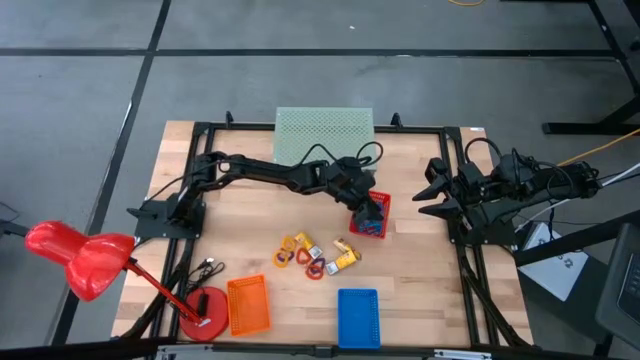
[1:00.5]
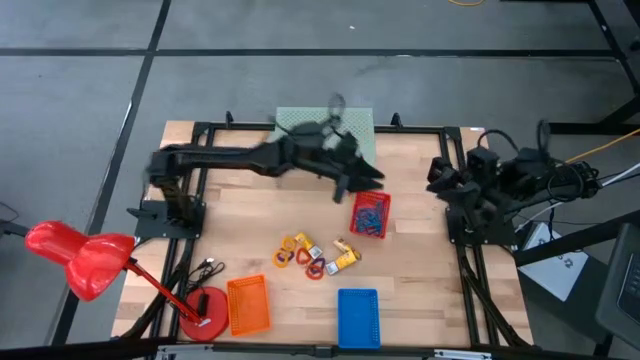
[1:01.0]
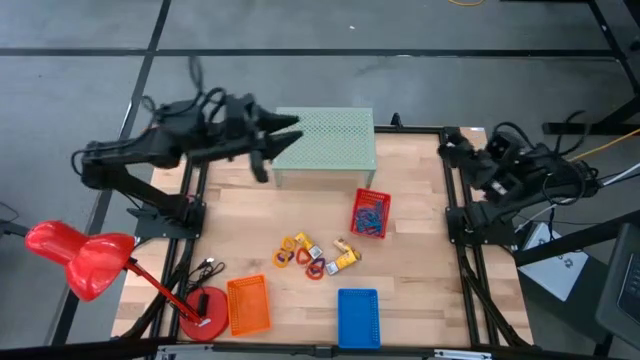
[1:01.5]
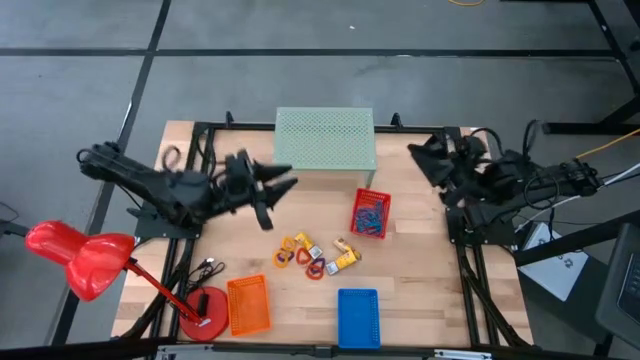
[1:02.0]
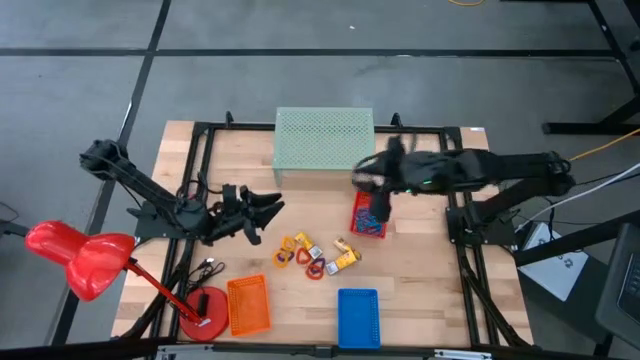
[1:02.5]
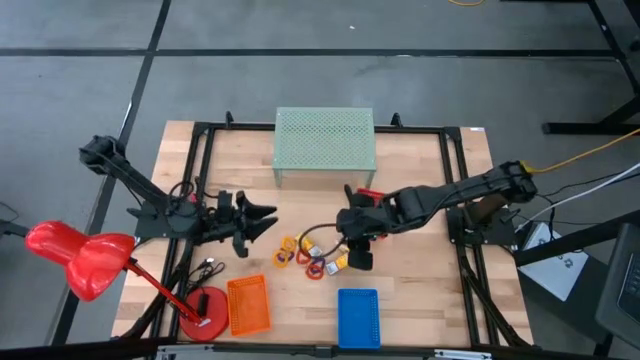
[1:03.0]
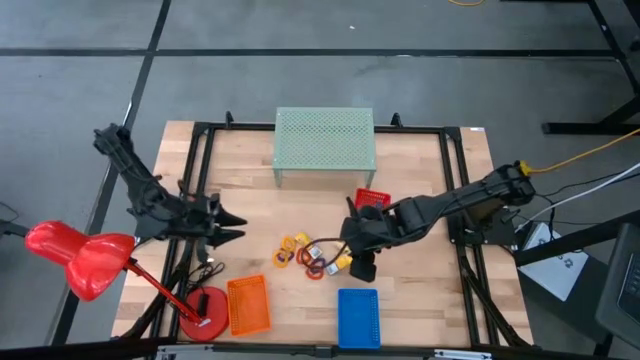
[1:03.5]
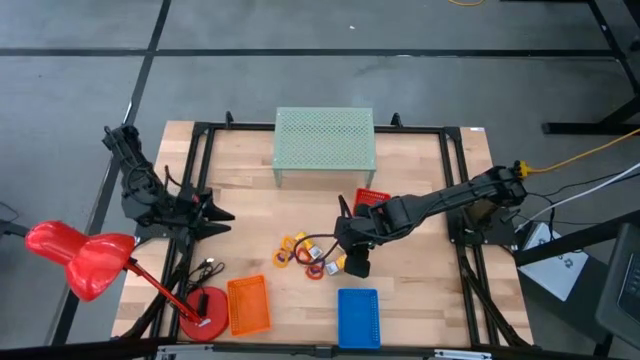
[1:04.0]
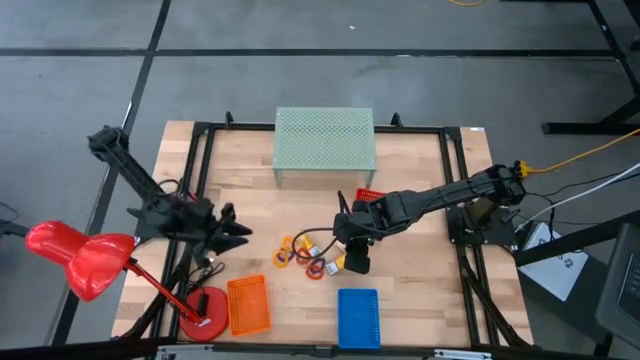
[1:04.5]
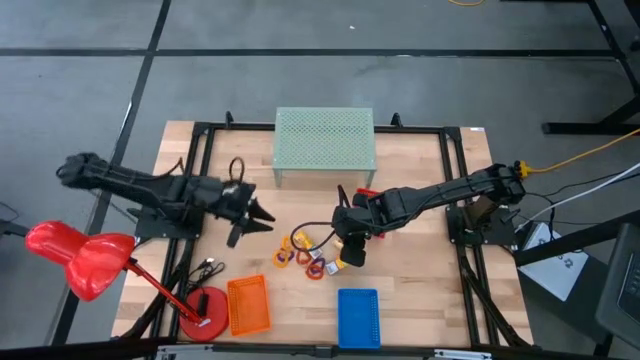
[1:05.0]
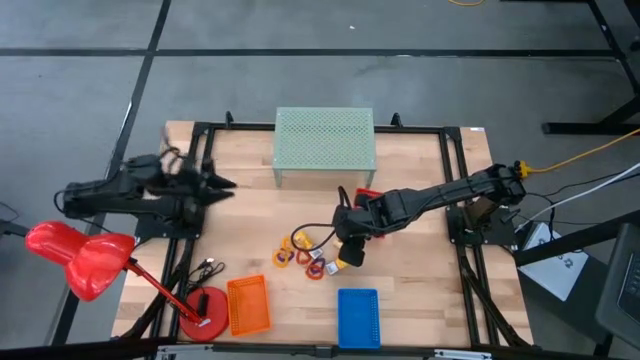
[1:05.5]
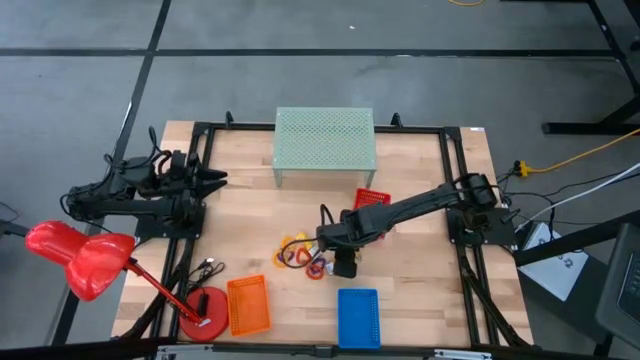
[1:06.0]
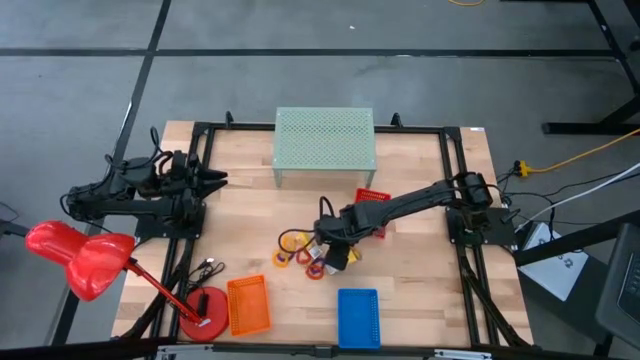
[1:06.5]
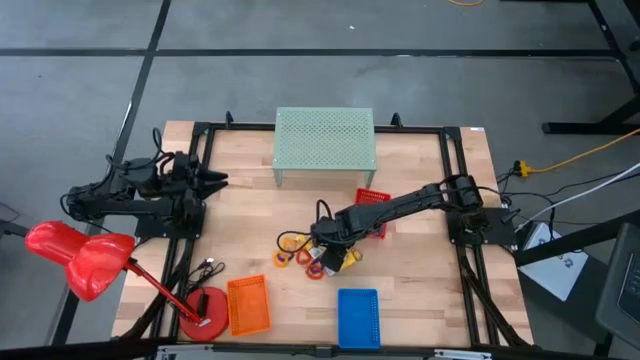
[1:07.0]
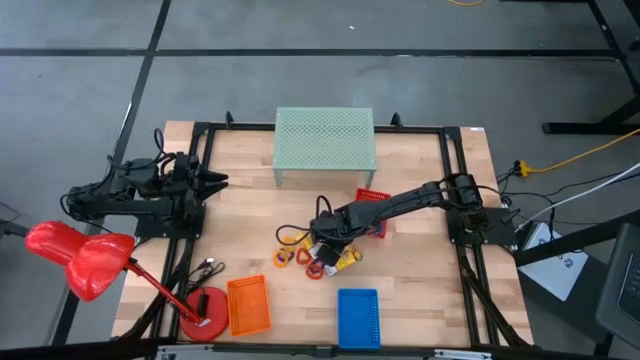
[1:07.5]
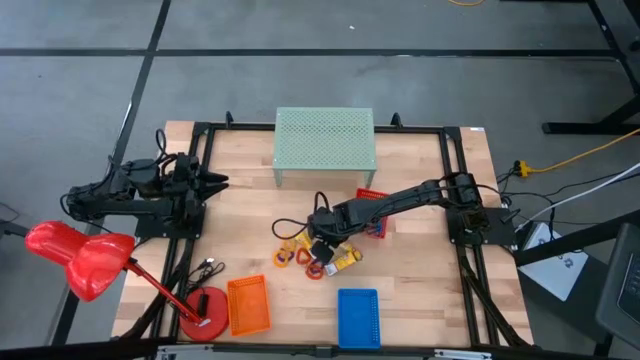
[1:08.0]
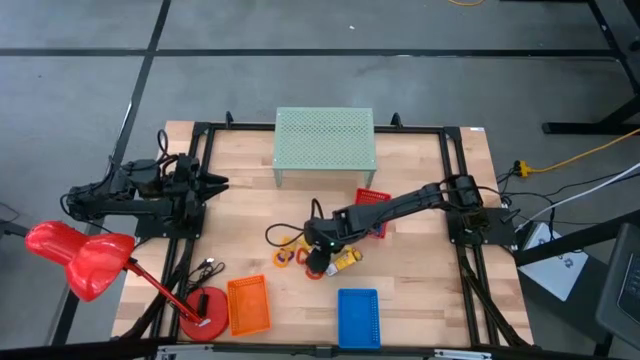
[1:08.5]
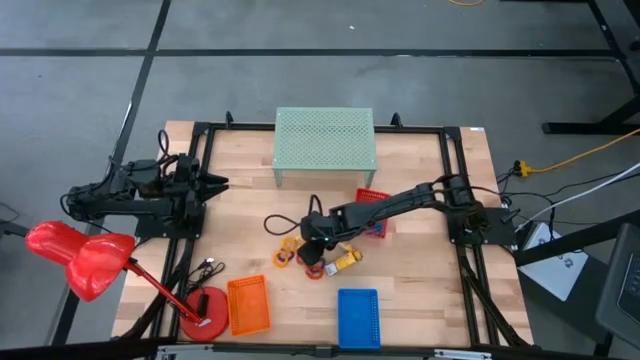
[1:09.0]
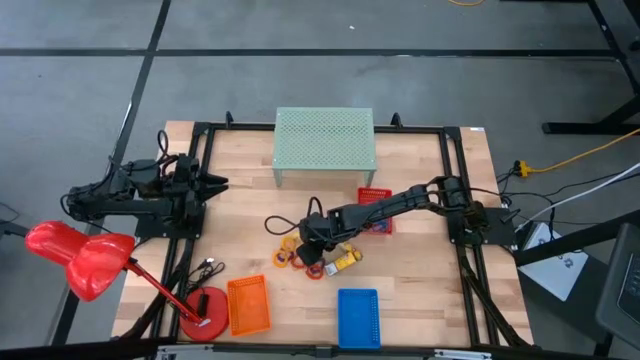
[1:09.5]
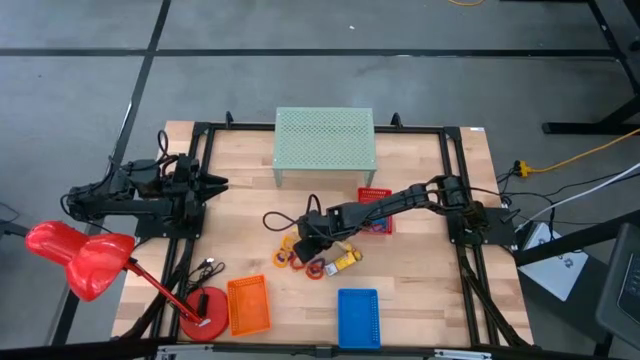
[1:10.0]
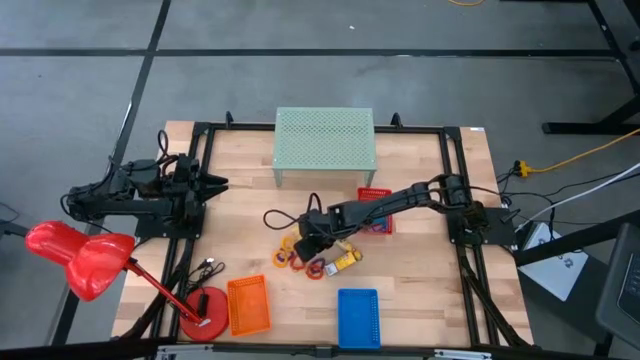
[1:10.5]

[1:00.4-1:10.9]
Task: Pick & Place Office Desk Supplies
Put the crayon box into the blue basket

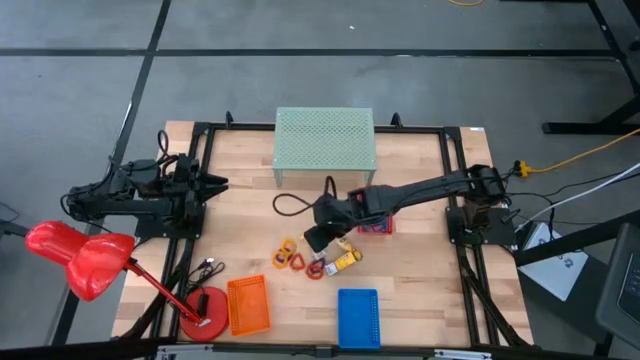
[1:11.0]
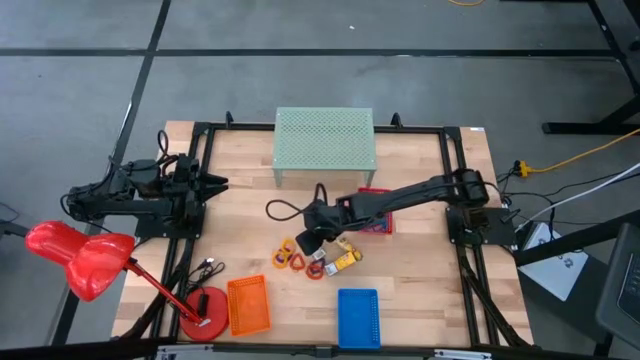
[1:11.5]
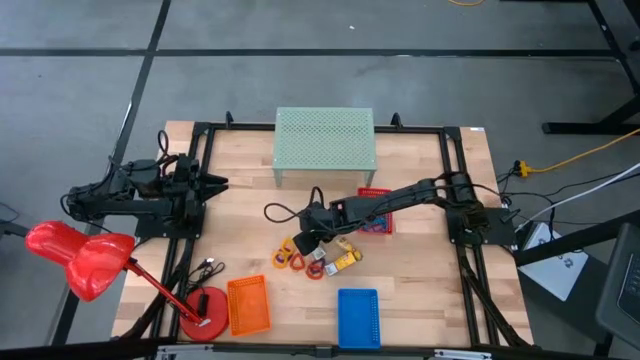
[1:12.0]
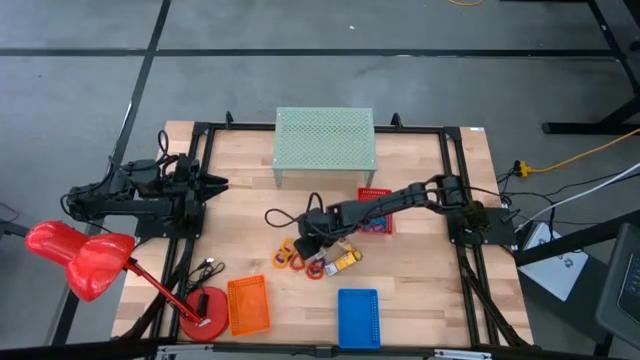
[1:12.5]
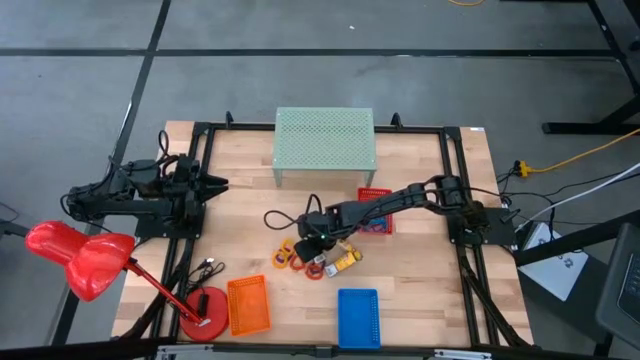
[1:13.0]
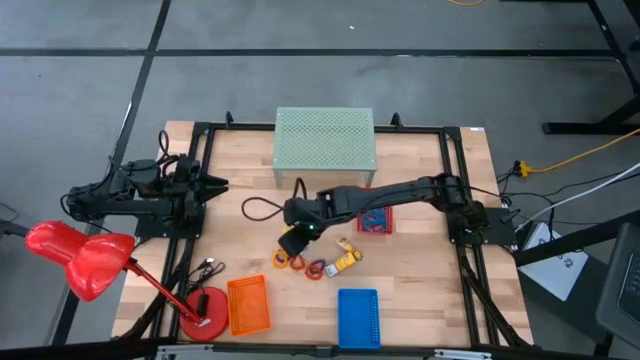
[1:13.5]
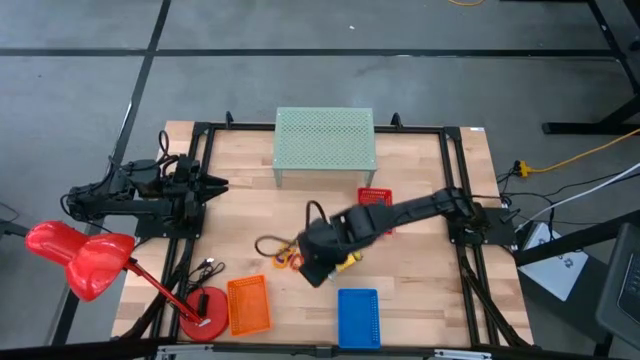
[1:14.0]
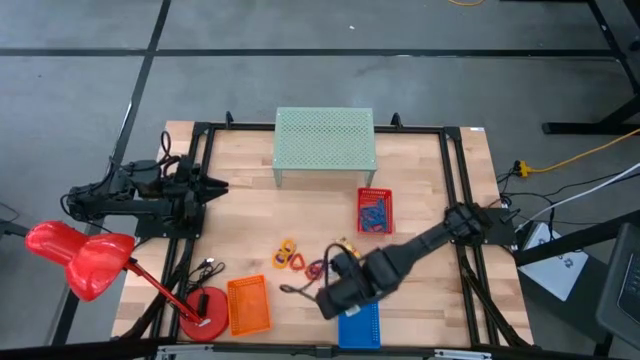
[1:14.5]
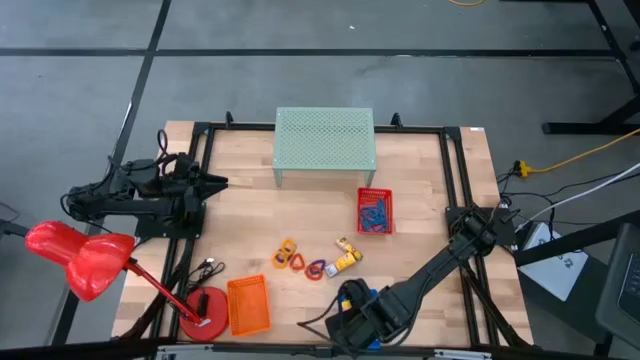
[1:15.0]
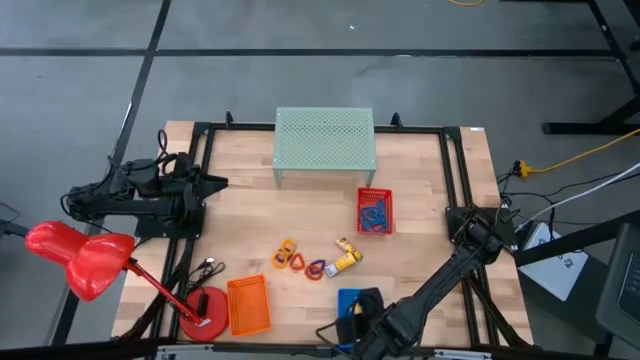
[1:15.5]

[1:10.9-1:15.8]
Put the crayon box into the blue basket

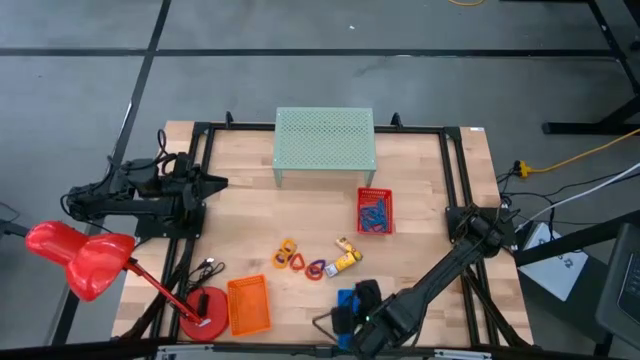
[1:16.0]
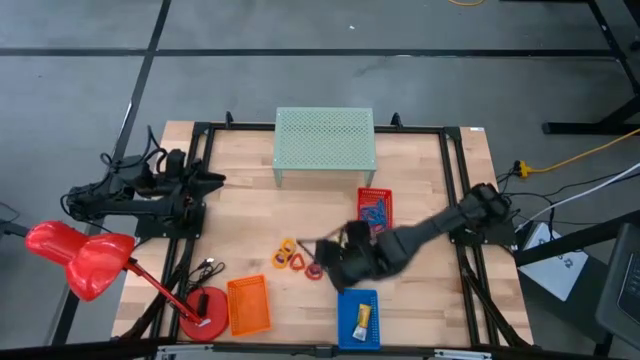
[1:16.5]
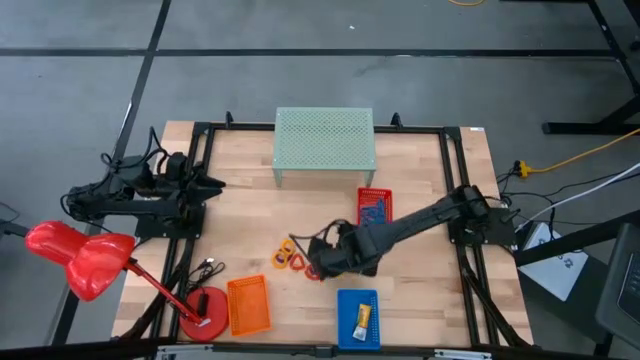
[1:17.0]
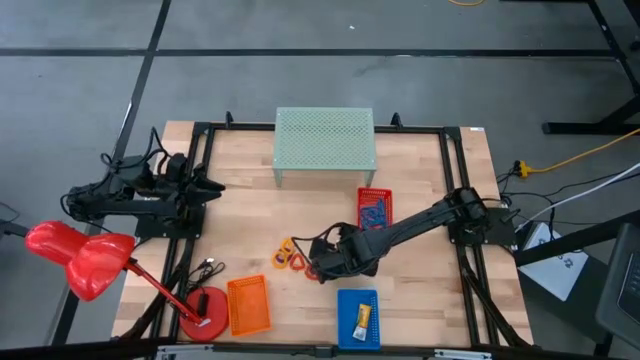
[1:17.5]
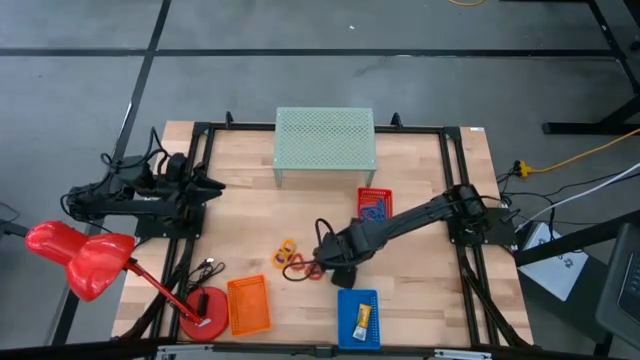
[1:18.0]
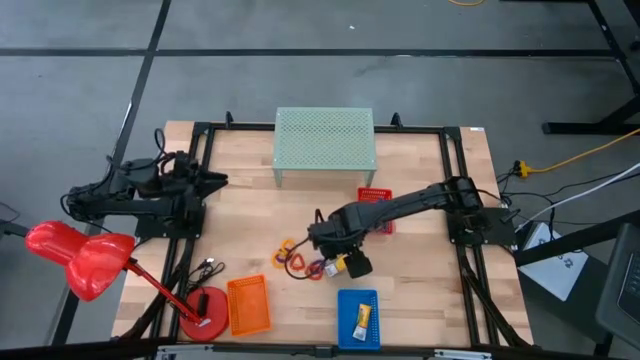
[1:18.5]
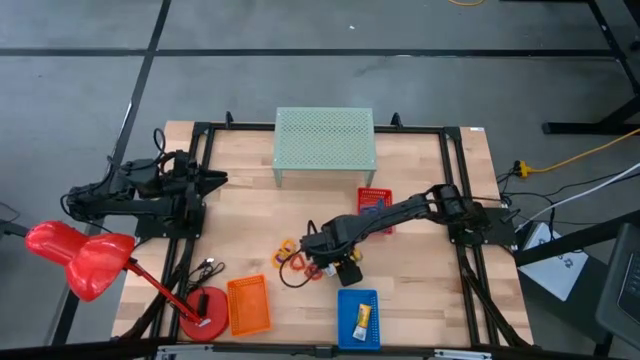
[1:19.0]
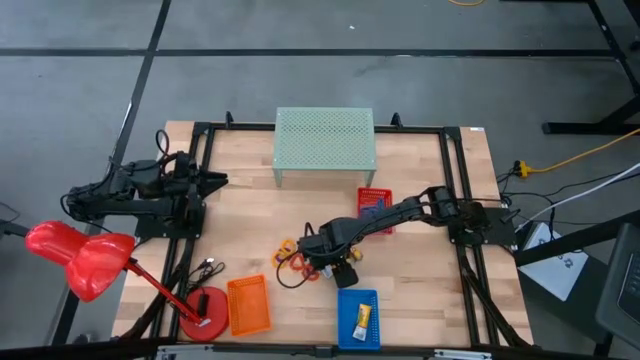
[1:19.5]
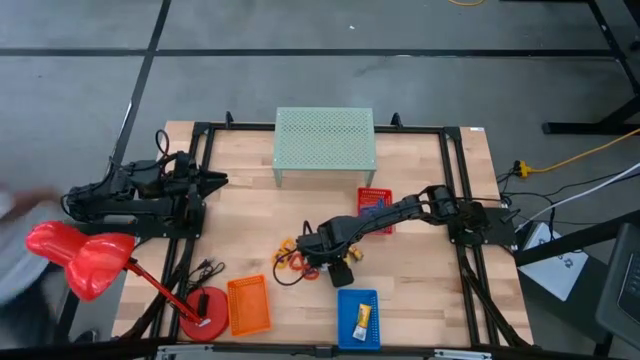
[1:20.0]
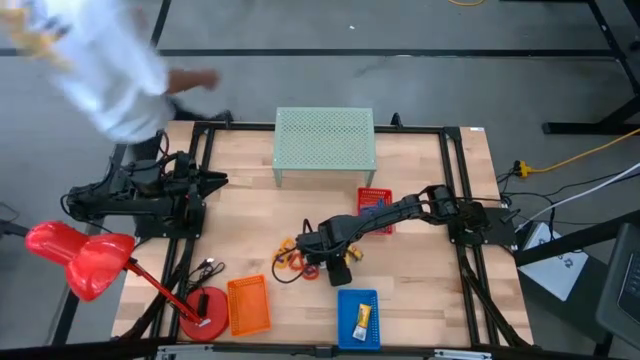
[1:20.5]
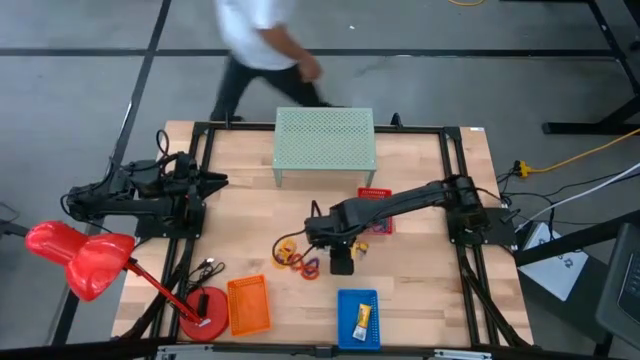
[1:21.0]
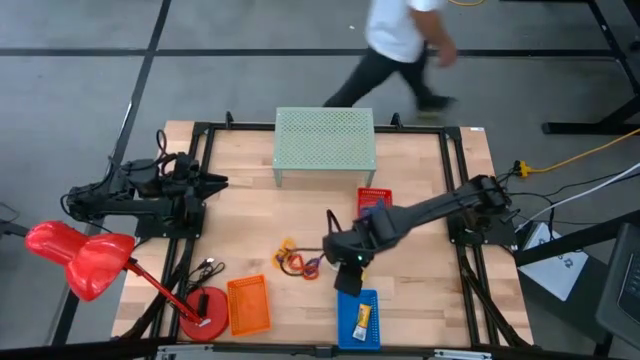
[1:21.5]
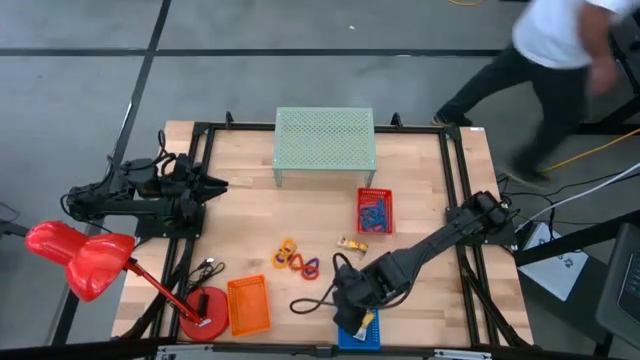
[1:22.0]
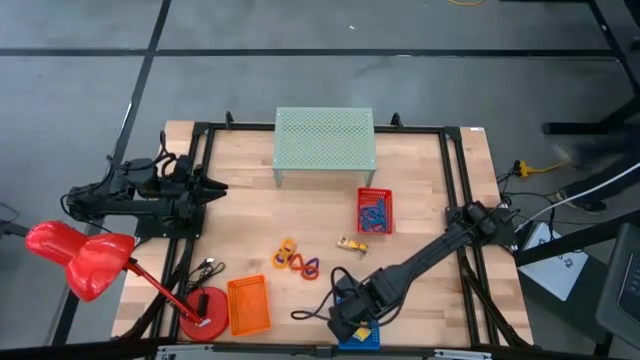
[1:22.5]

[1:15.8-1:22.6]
Put the crayon box into the blue basket
